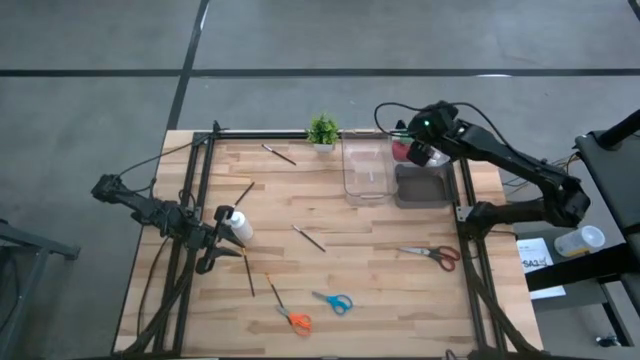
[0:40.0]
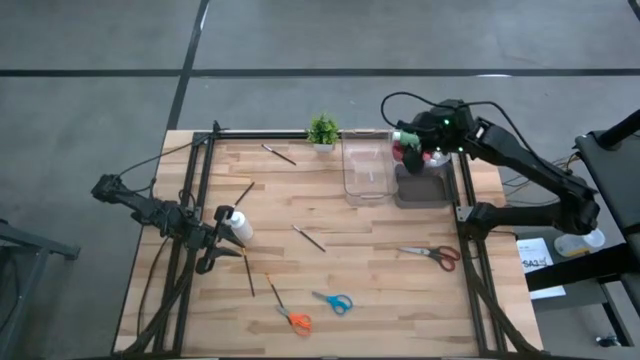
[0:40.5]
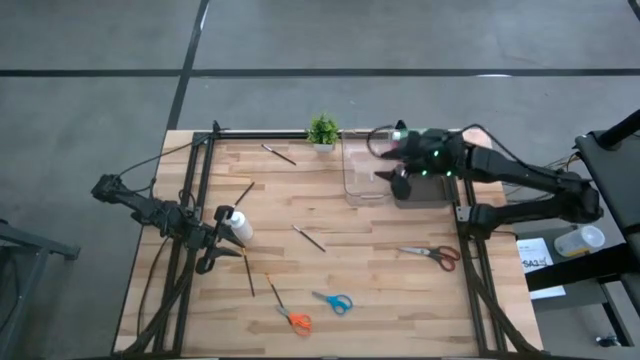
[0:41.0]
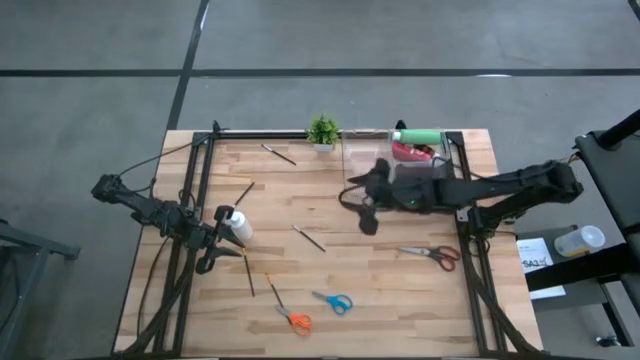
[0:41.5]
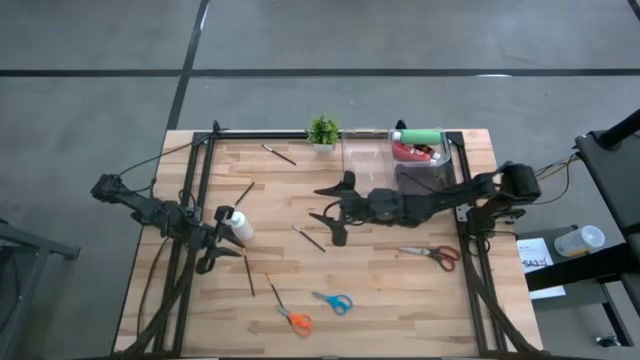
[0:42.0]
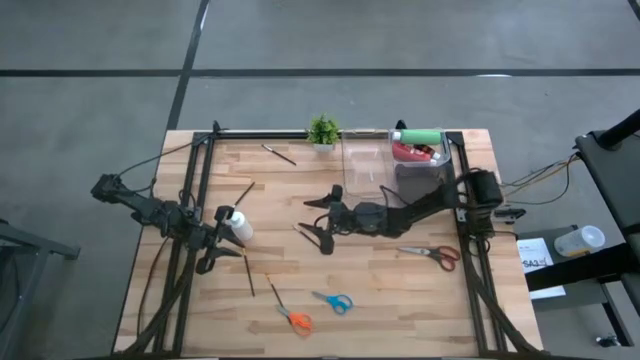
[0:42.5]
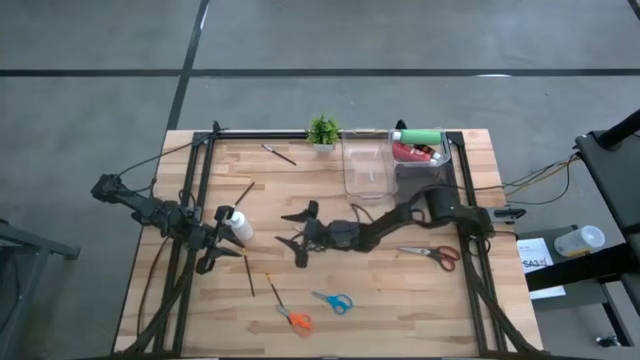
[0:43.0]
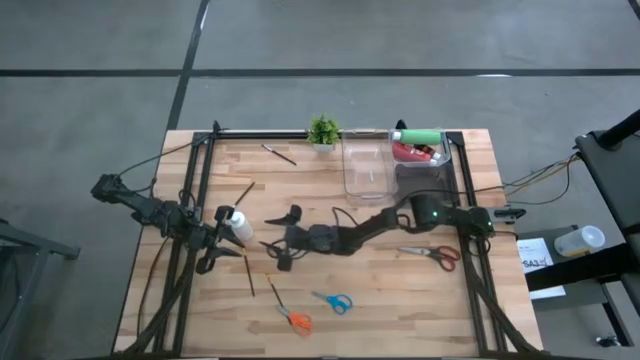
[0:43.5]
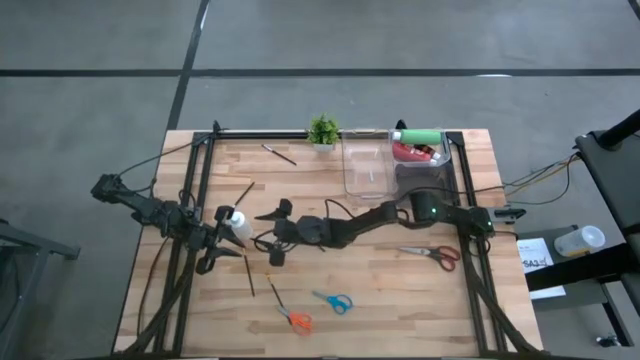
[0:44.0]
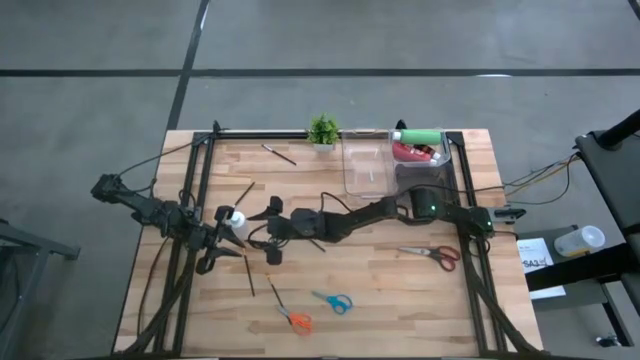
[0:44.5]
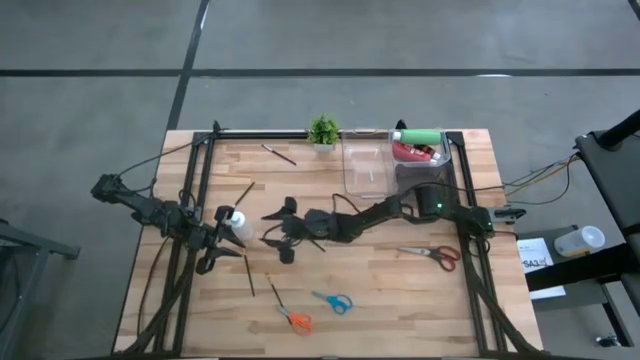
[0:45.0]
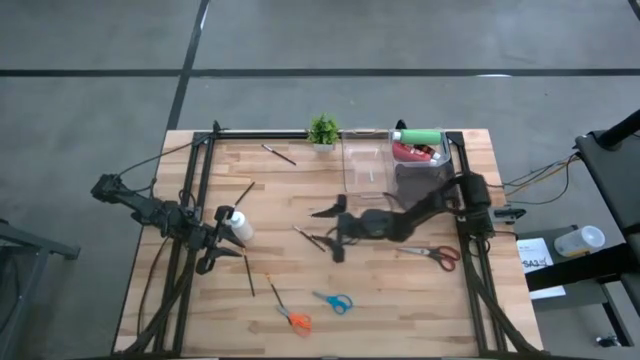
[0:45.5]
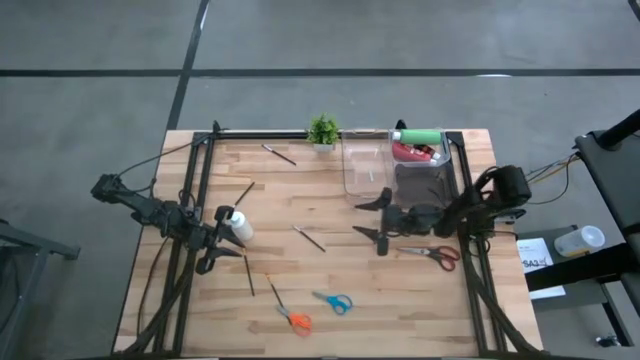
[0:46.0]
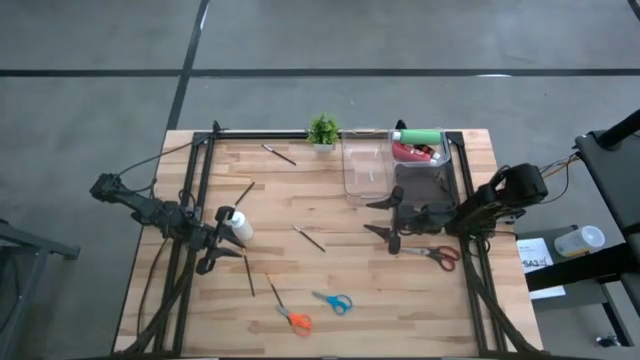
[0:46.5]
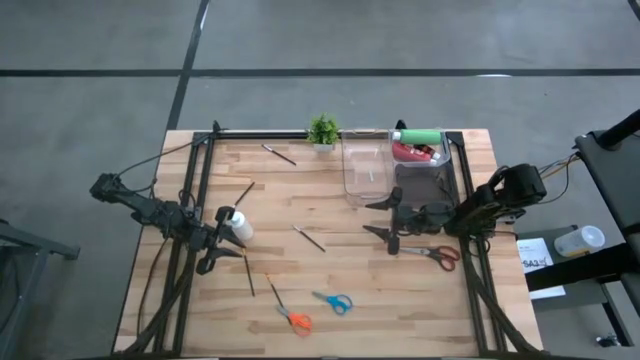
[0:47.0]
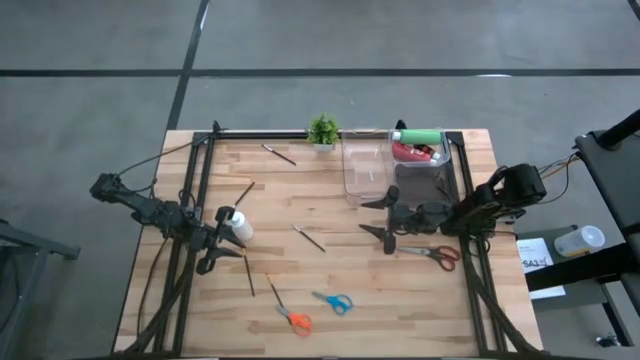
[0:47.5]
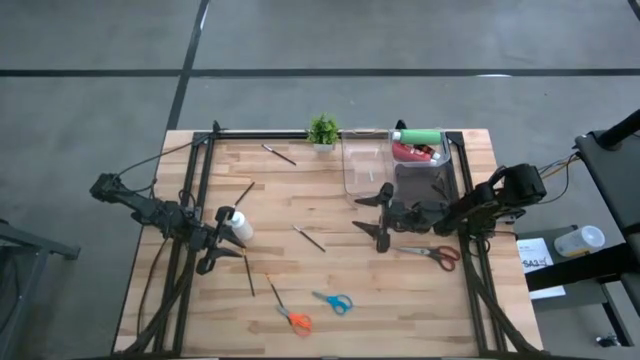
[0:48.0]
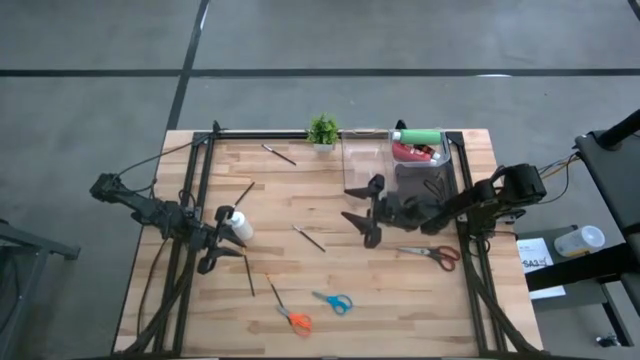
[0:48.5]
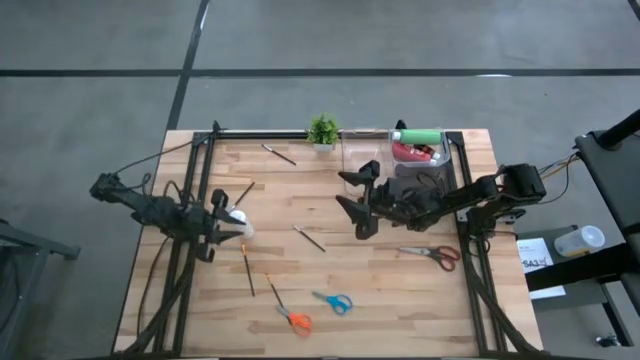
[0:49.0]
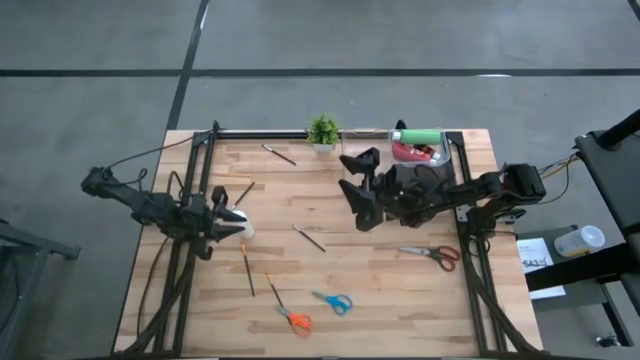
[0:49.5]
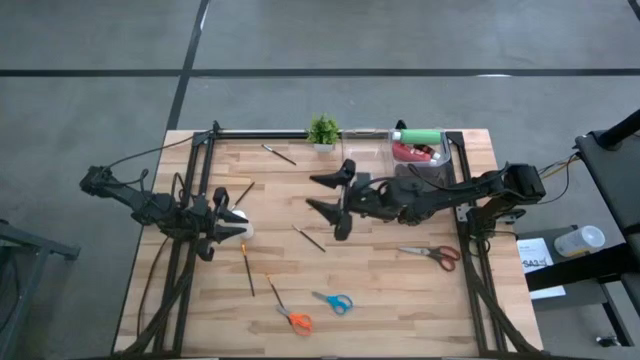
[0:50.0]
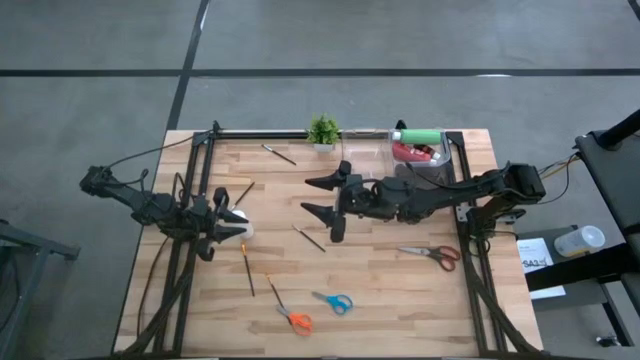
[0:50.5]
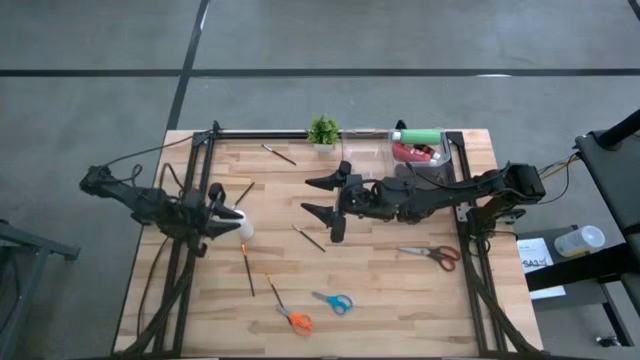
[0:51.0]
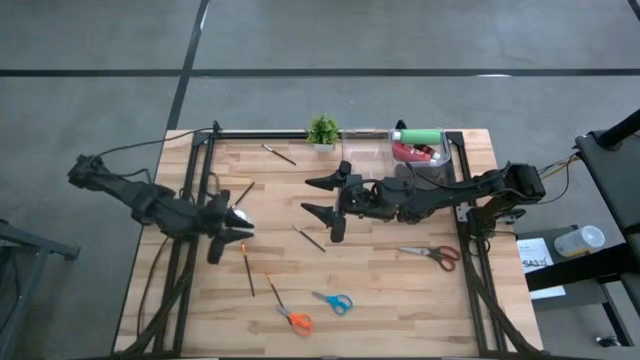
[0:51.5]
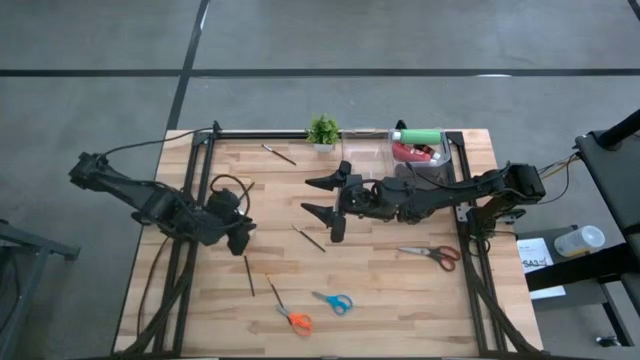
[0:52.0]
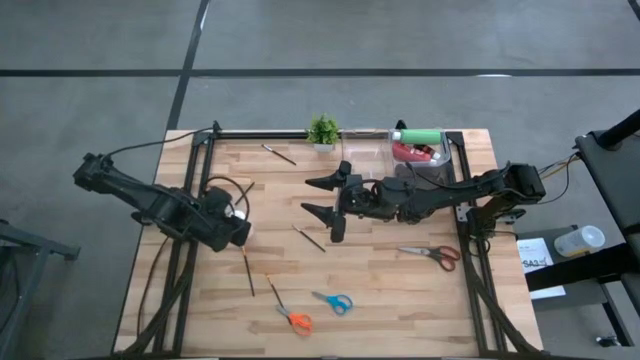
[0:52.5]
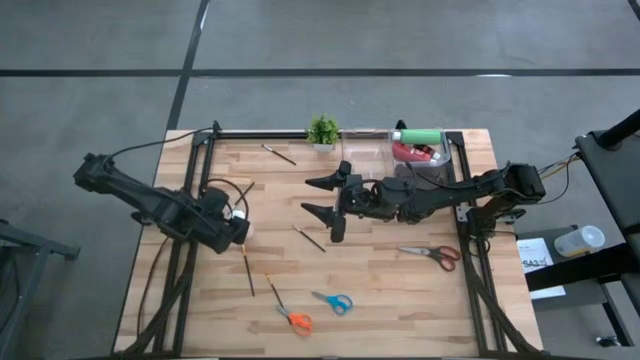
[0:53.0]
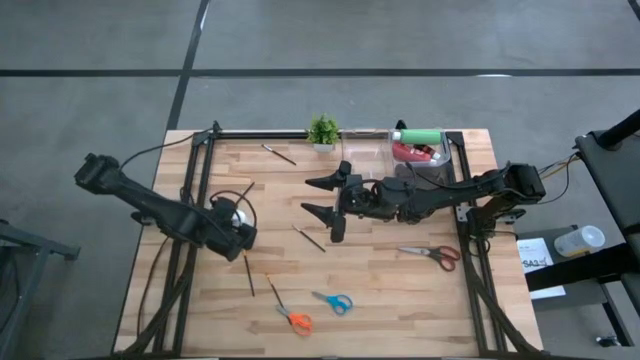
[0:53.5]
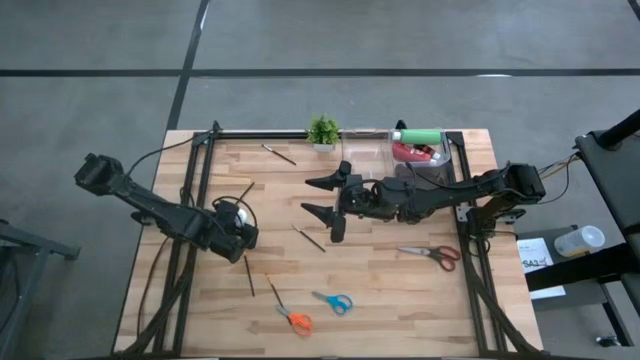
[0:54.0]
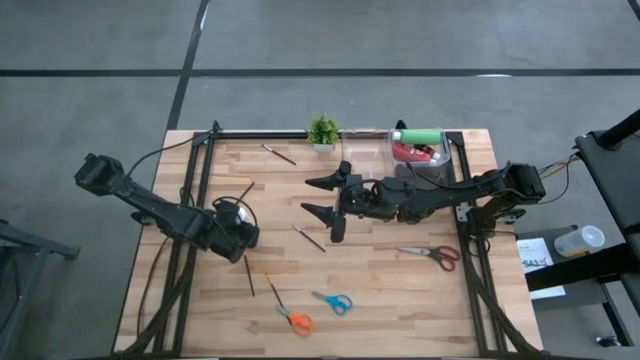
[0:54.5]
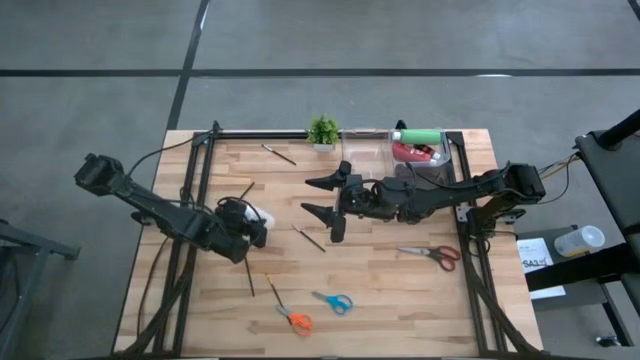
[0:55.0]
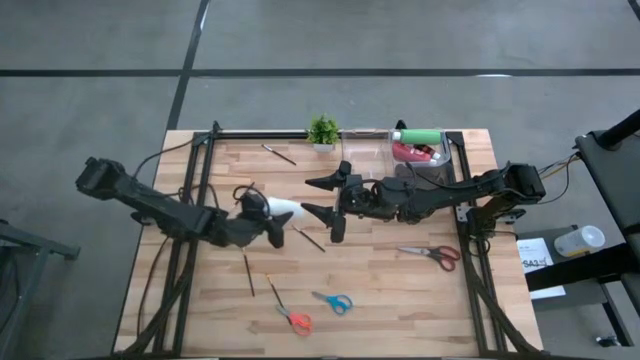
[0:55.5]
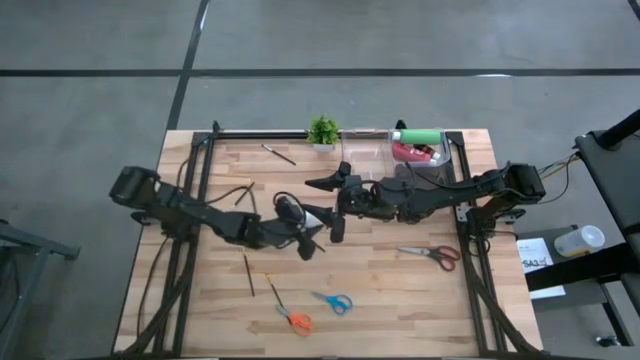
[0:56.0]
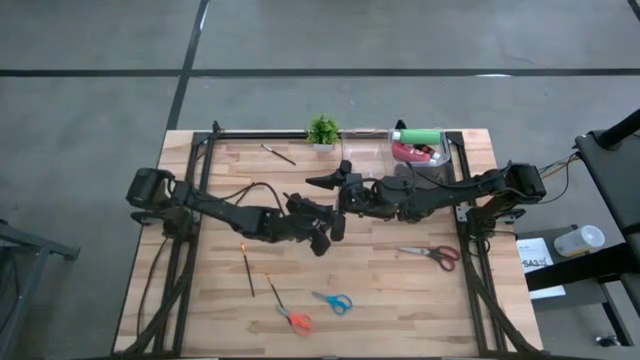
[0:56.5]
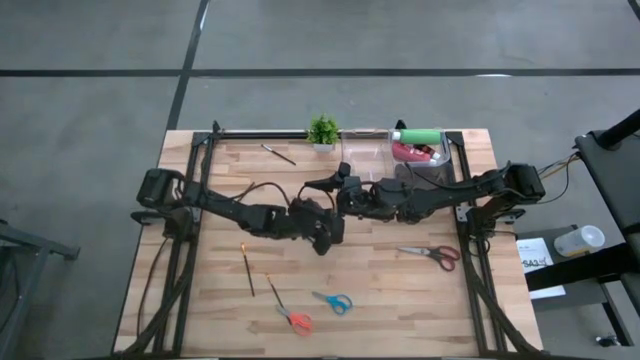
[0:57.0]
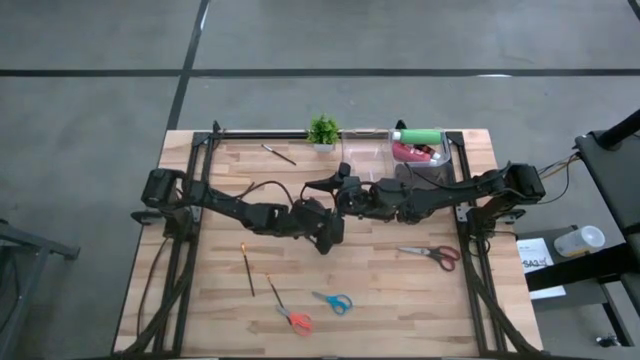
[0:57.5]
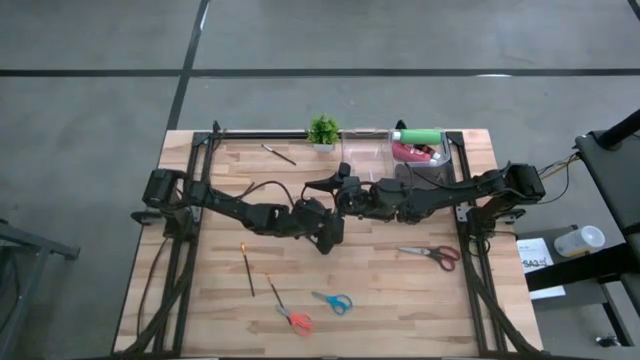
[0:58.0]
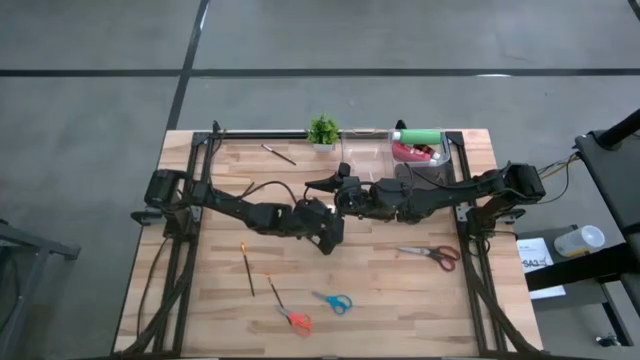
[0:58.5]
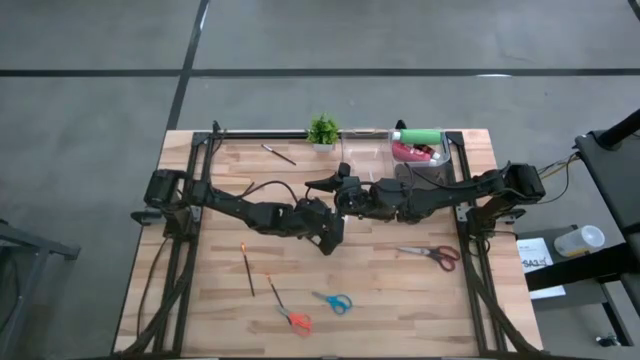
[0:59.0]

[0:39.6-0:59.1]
Task: Pick & Place Paint Supplies
Put the white paint bottle into the right transparent bin
